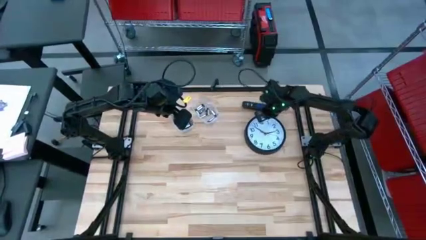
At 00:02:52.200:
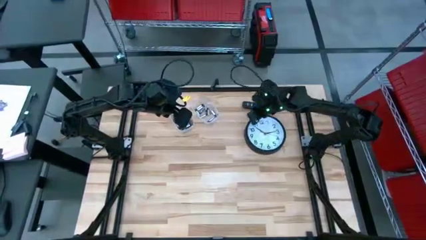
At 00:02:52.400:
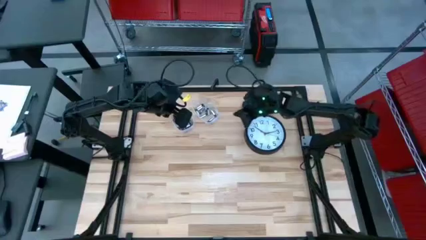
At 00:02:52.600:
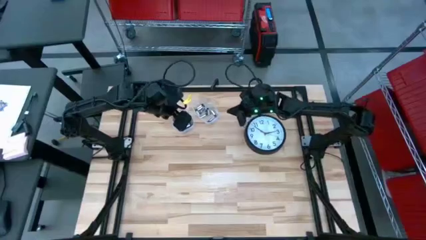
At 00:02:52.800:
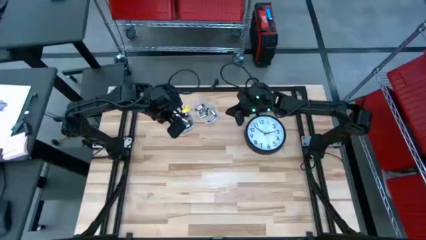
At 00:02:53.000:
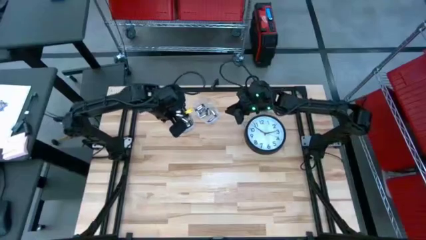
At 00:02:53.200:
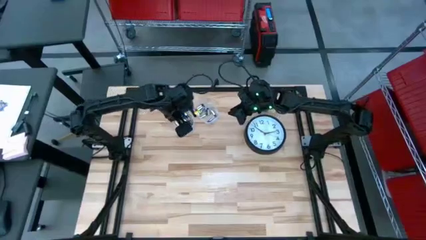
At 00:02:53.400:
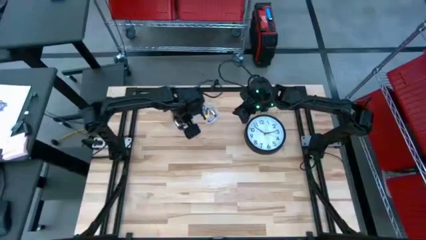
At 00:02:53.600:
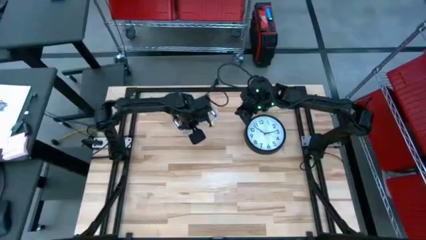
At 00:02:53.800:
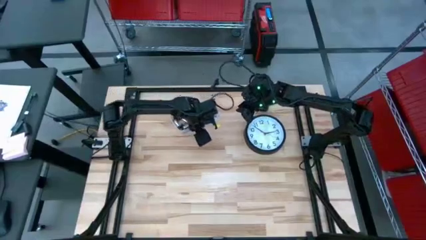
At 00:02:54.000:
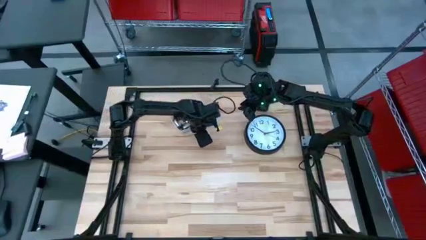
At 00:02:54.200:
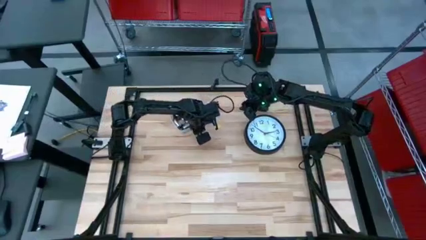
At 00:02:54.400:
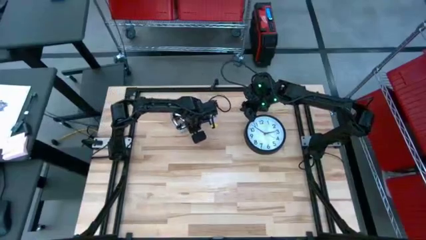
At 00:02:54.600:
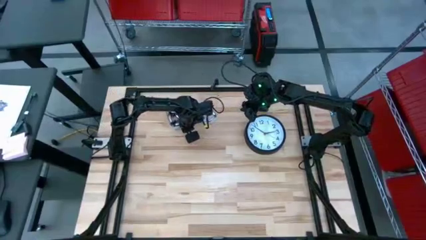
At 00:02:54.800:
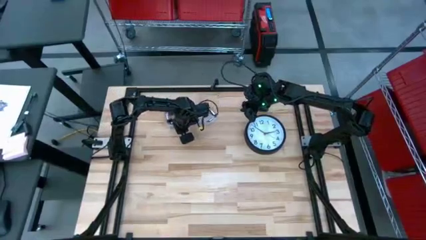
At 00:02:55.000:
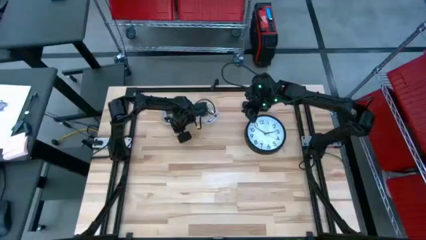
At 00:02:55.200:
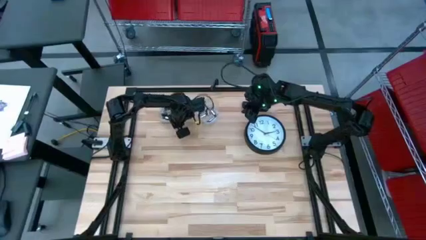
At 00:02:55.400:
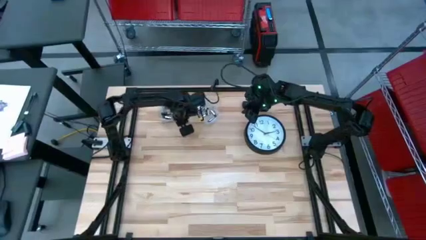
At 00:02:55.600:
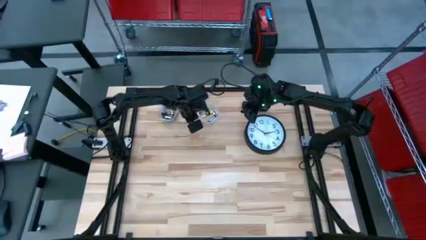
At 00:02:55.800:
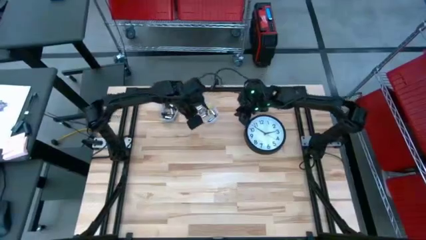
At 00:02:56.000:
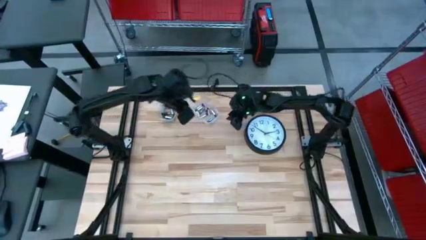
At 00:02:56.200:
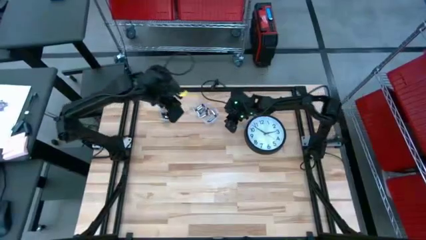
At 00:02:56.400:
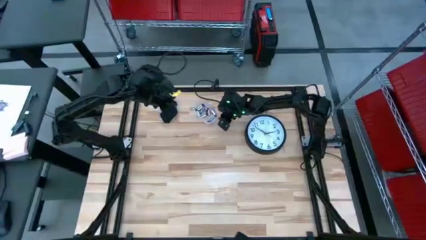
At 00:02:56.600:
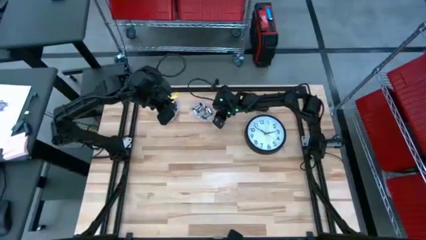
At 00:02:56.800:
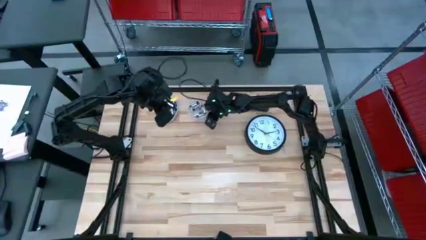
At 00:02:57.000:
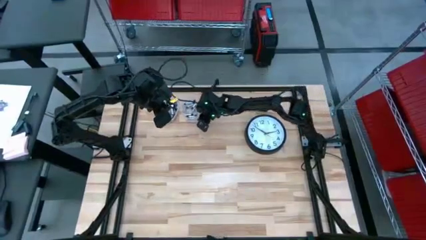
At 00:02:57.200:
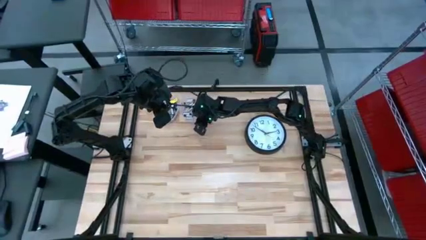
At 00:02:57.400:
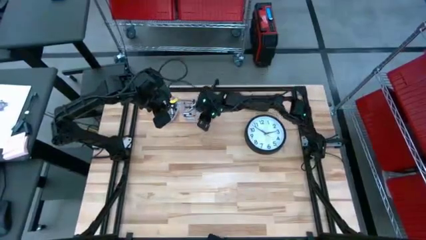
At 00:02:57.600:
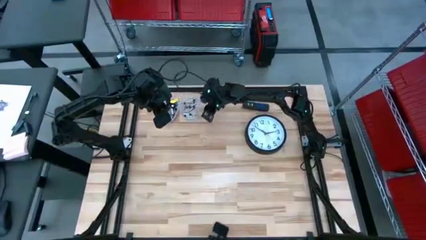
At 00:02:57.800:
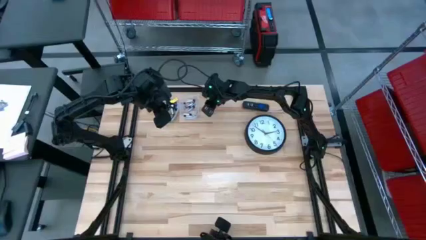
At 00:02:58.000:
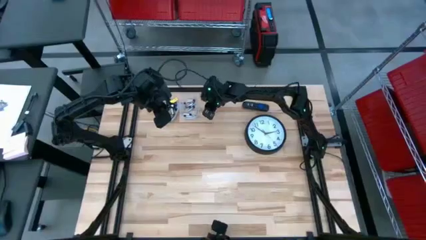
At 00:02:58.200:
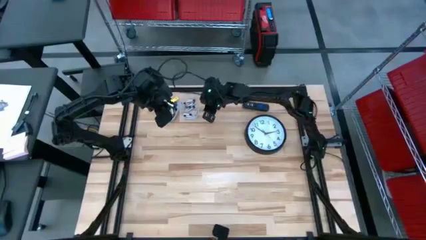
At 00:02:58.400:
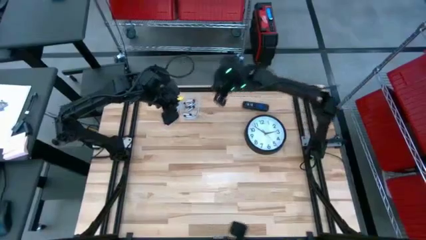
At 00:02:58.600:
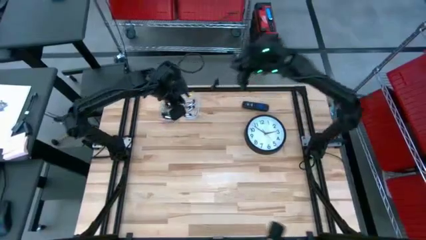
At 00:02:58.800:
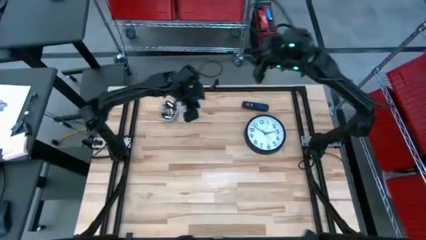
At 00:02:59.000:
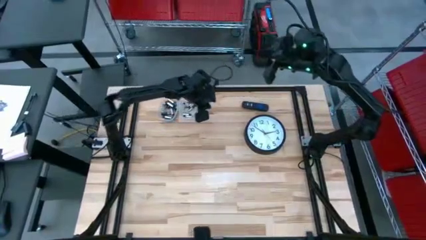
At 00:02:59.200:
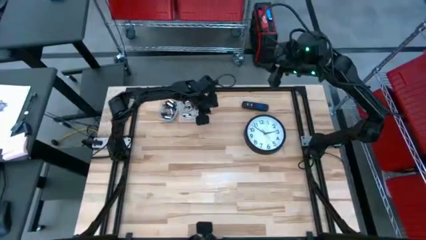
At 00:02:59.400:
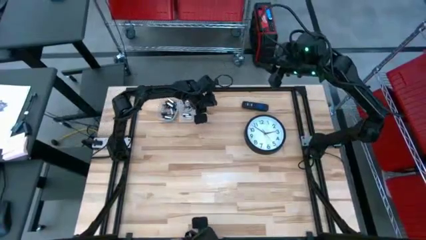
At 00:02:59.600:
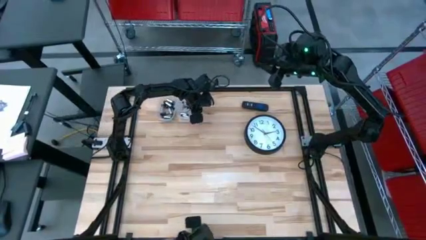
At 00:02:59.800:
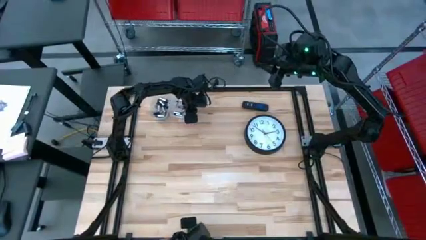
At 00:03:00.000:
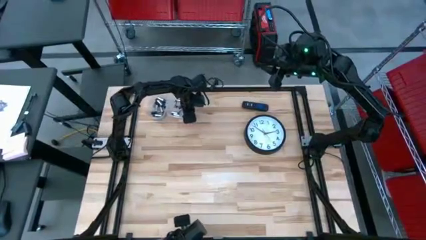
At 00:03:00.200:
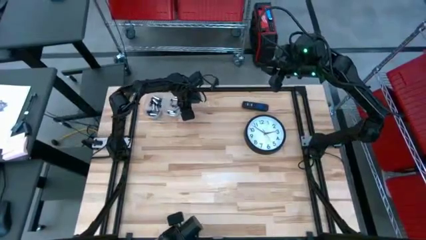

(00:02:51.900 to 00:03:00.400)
Task: Insert battery
Adjust the bins with the batteries

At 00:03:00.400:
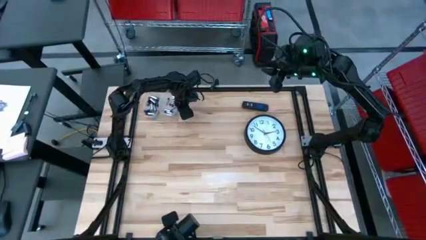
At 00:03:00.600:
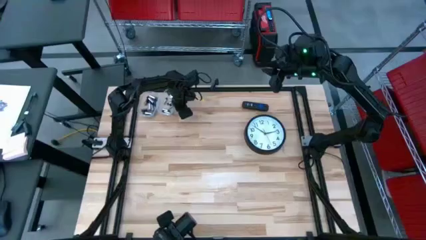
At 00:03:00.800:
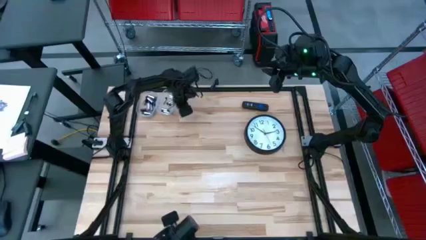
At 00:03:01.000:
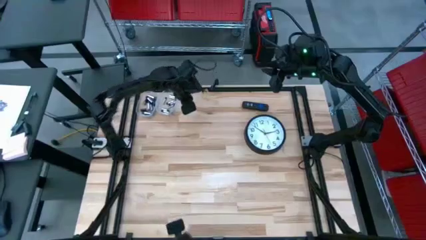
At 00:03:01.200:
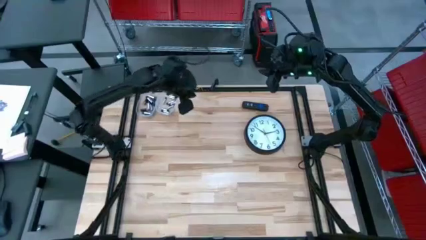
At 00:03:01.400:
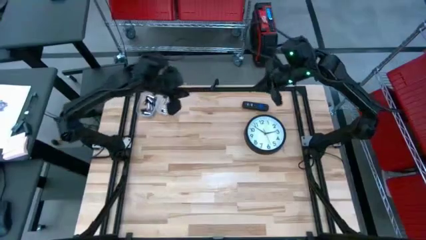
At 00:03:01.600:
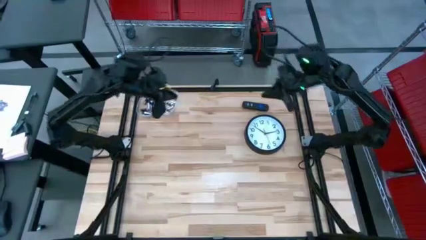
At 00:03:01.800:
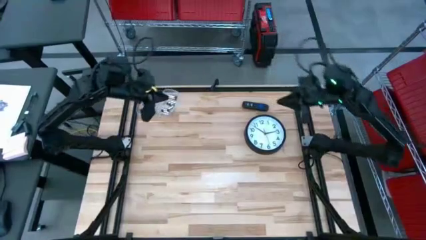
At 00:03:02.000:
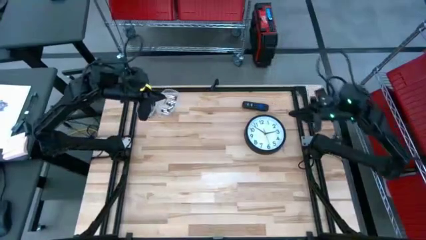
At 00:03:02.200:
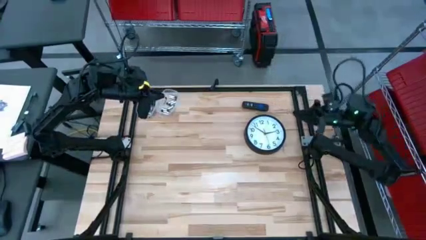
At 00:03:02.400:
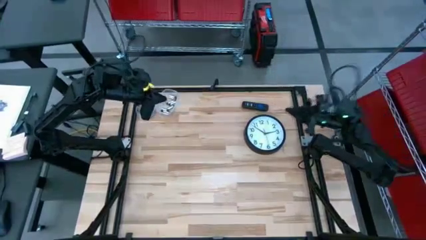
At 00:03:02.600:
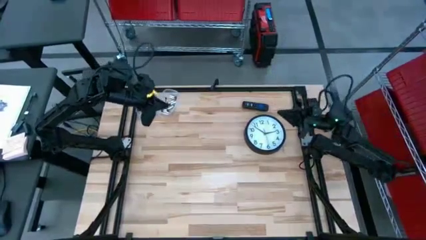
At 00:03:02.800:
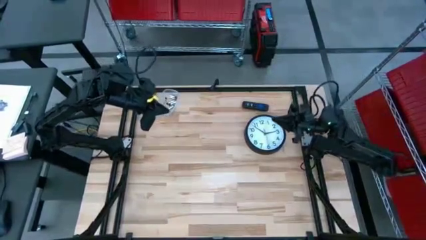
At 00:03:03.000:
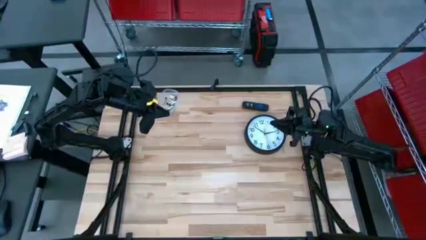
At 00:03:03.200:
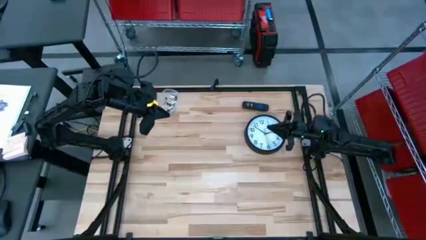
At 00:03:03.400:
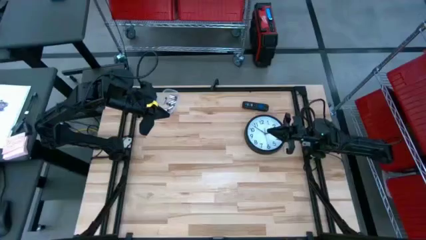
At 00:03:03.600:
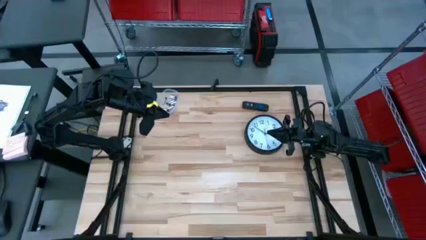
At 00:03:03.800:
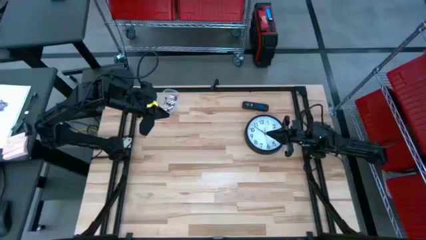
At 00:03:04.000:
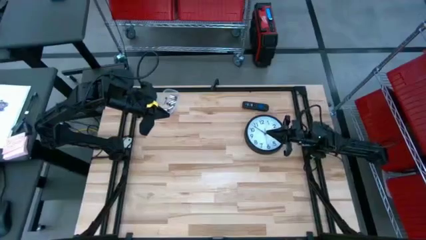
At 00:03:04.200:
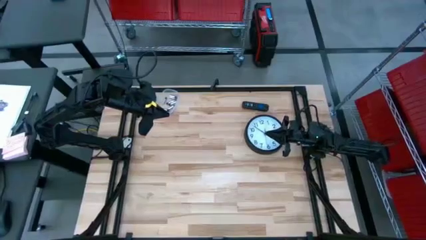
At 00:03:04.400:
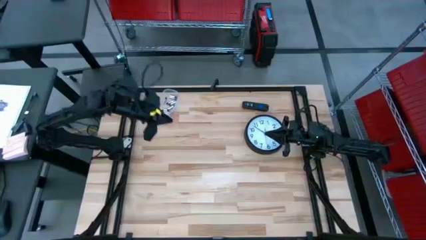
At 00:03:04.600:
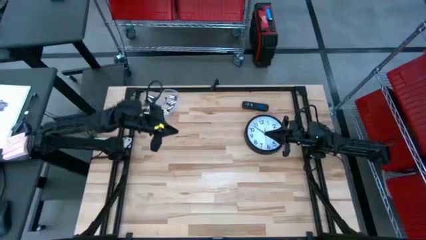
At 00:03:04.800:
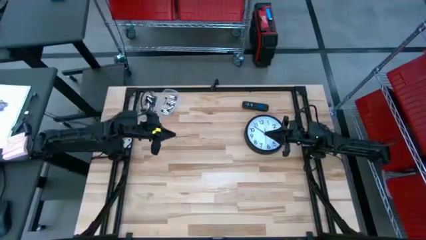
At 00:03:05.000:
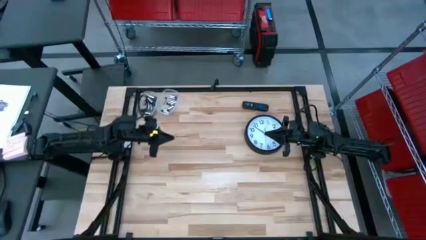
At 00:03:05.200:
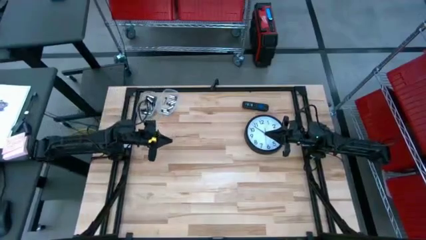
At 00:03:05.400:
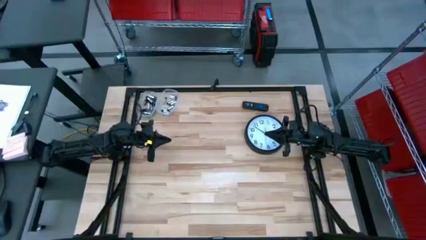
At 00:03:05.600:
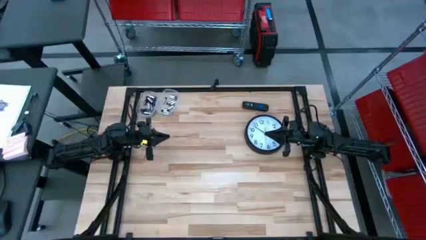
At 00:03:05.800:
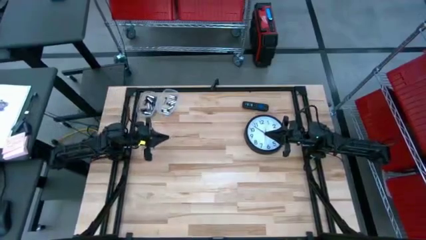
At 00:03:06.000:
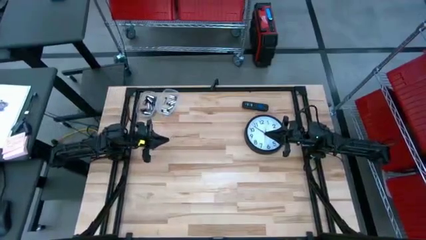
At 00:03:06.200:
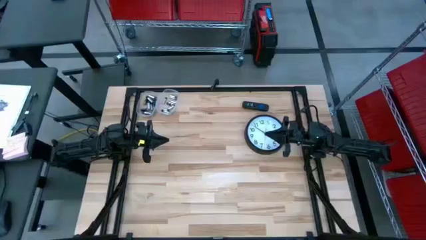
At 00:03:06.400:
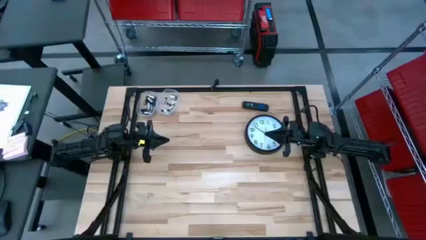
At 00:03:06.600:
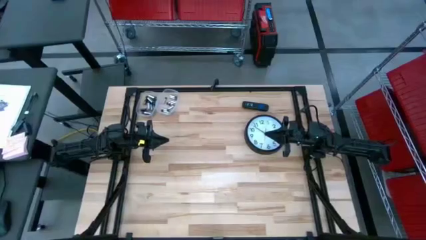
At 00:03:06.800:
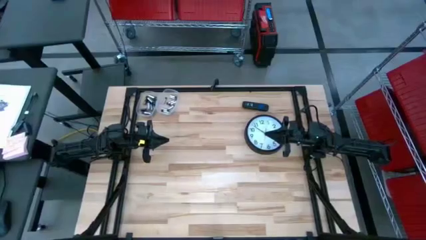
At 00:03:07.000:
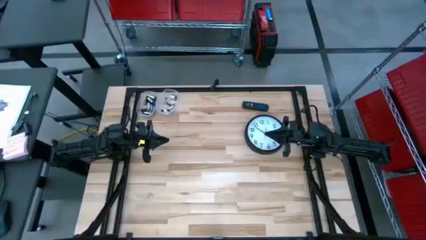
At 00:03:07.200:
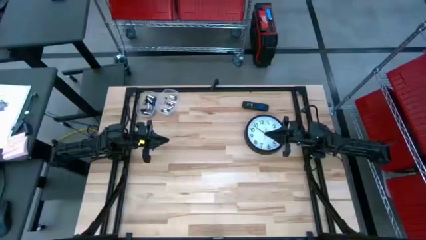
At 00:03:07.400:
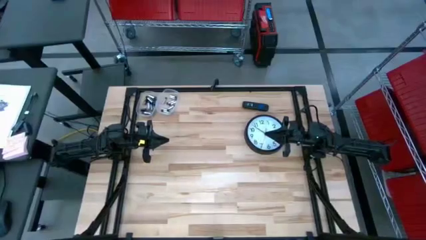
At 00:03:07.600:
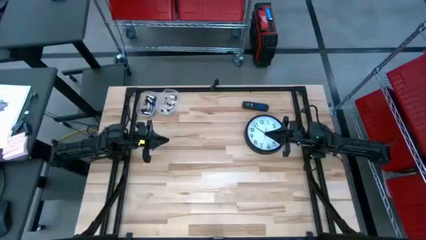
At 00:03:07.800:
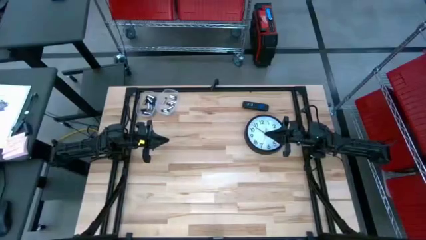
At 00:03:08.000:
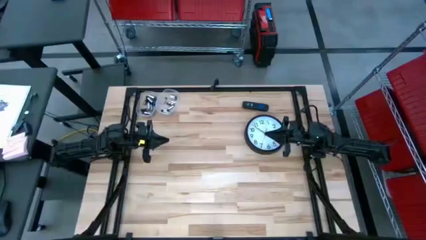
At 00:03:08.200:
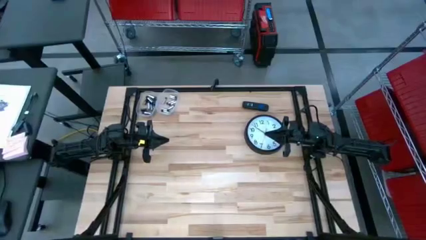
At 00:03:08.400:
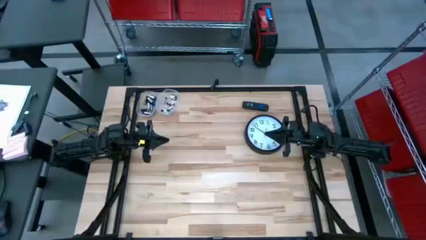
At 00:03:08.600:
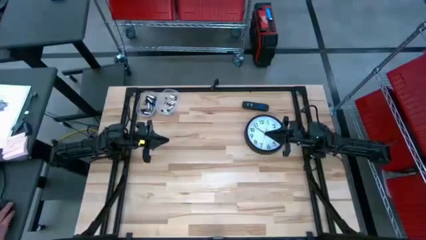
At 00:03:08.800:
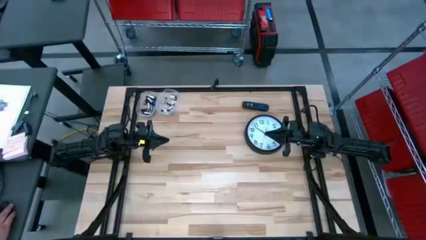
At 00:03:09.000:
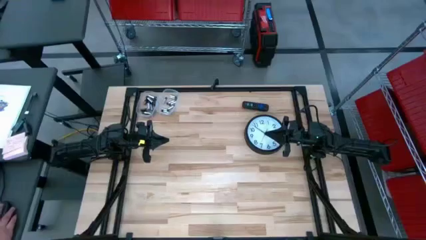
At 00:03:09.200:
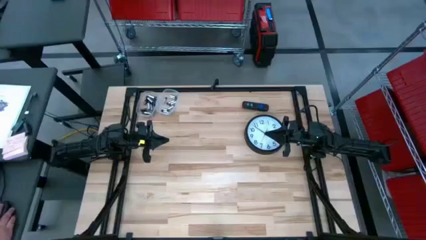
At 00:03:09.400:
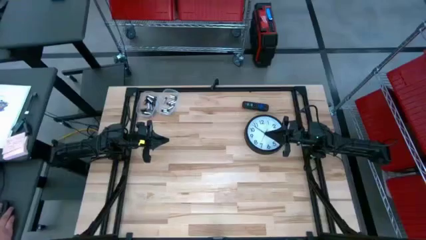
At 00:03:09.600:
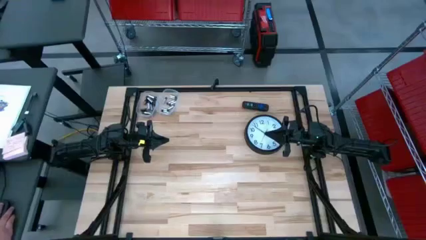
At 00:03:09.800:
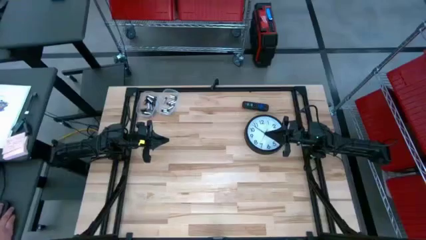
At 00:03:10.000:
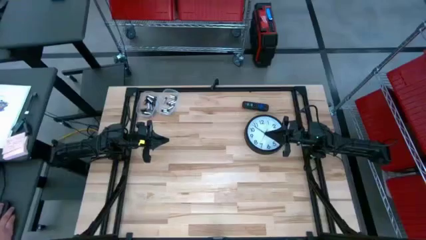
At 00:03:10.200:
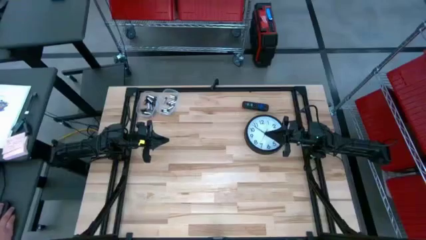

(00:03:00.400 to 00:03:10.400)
Return to Home Position
